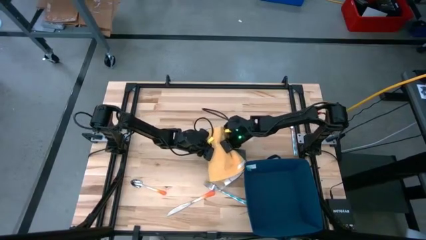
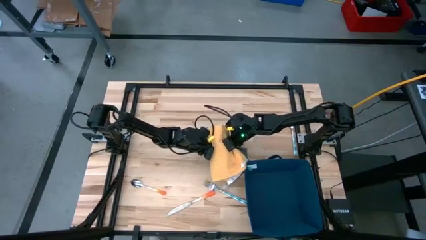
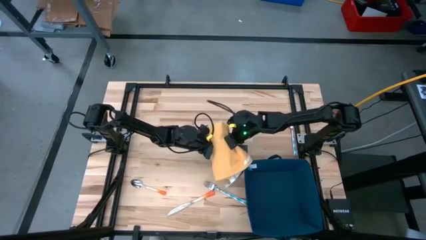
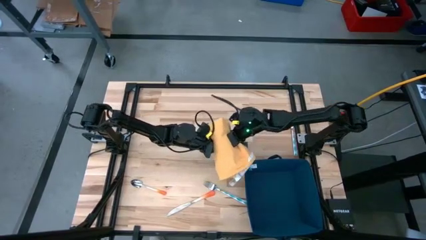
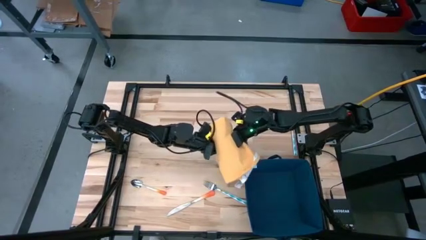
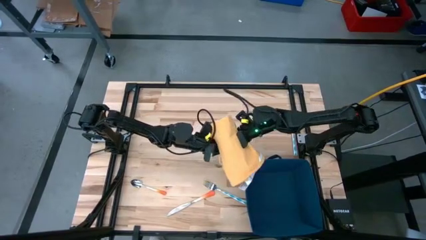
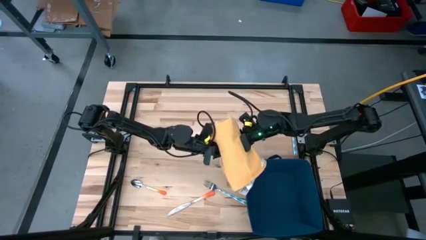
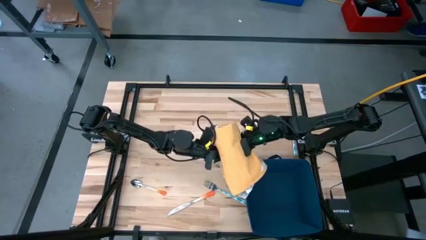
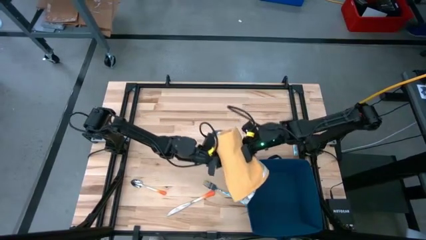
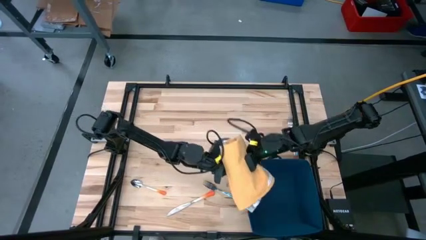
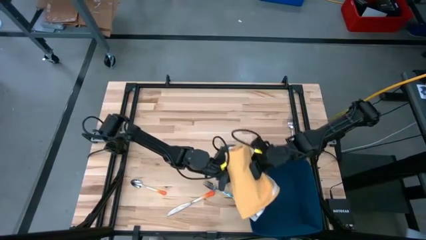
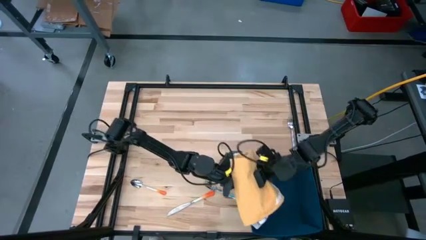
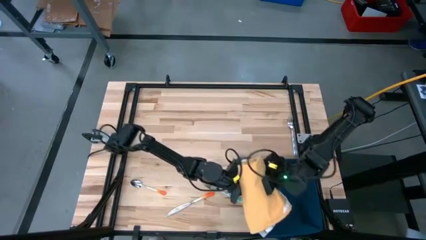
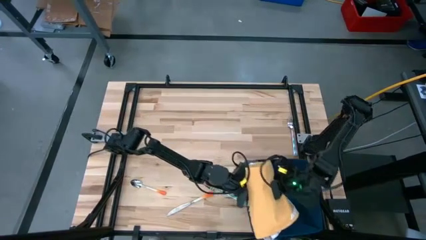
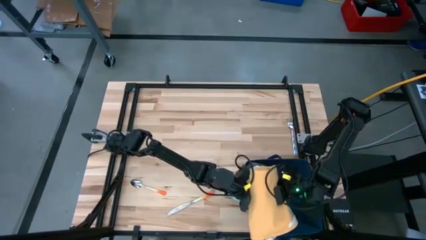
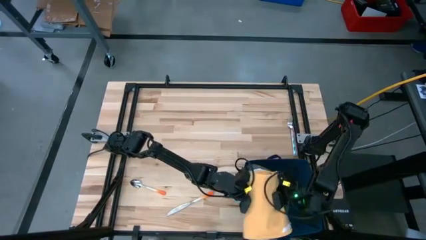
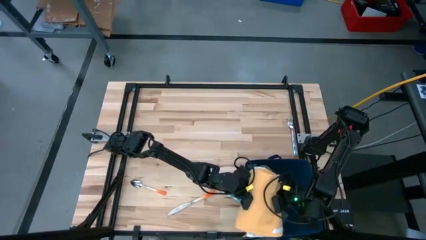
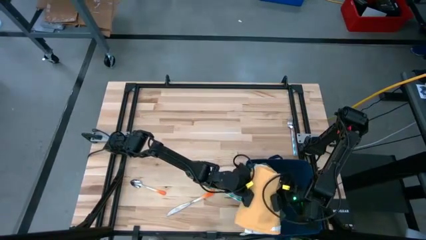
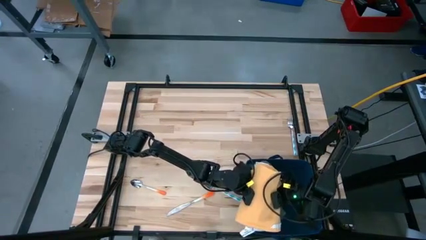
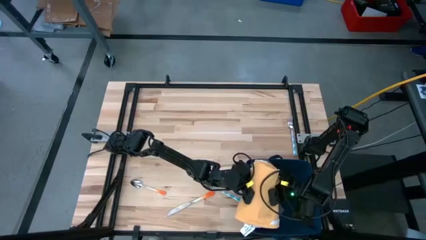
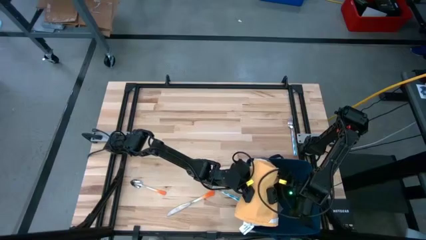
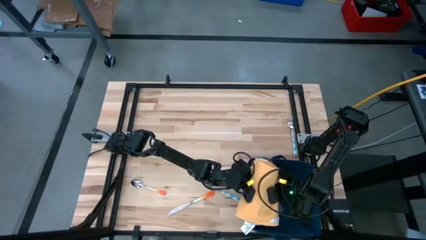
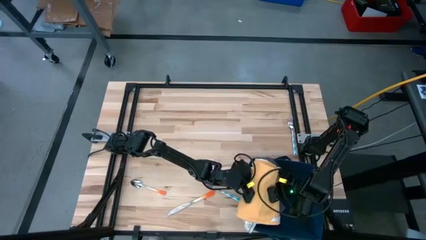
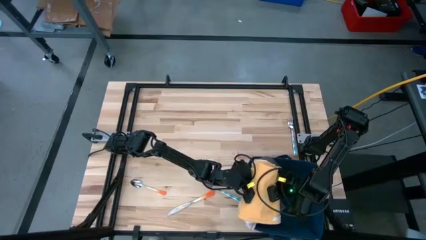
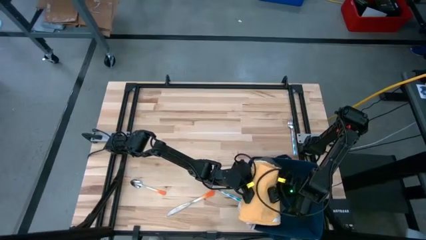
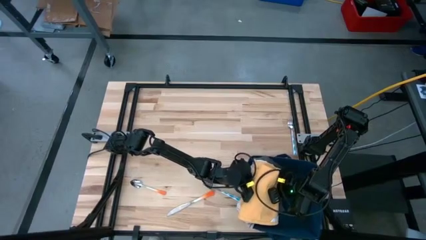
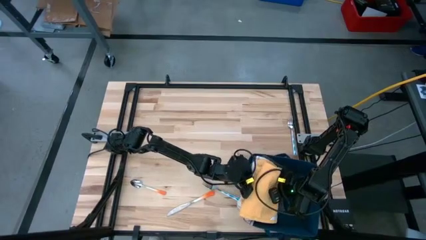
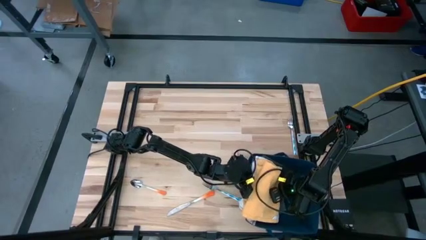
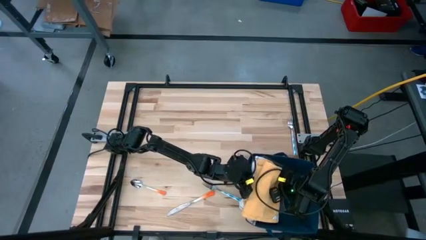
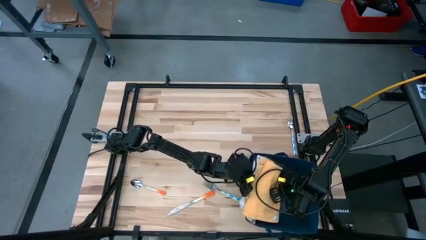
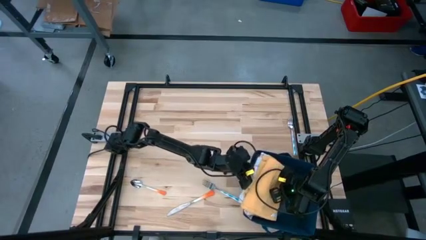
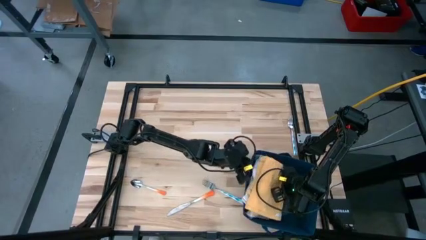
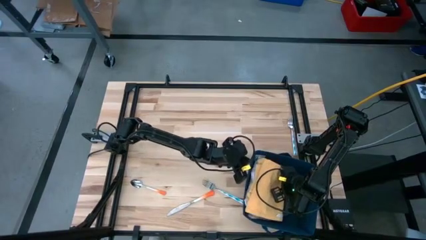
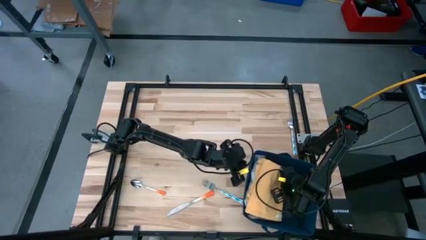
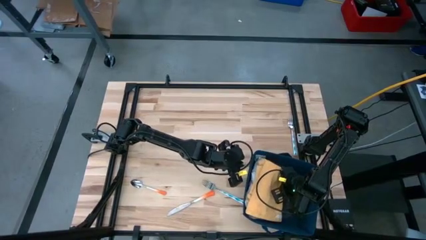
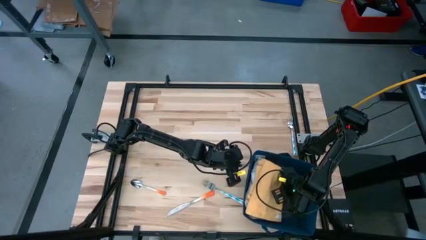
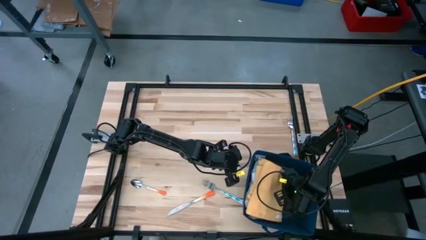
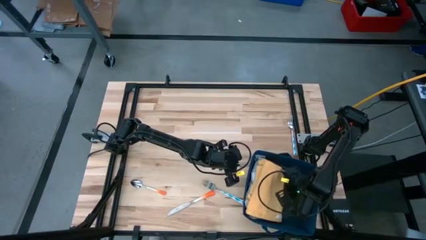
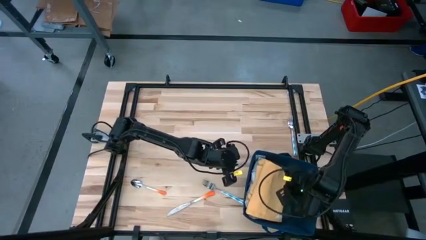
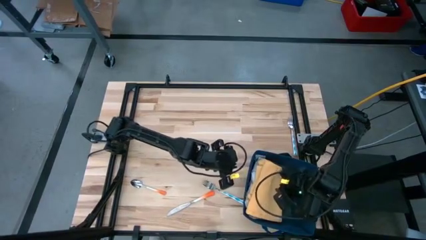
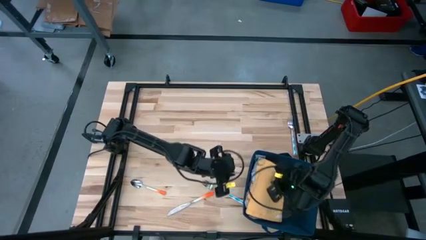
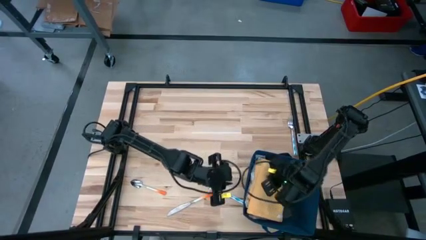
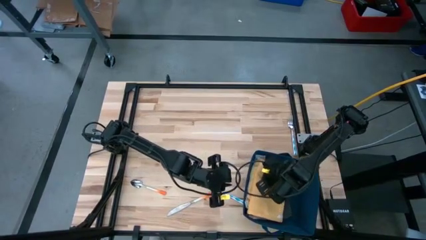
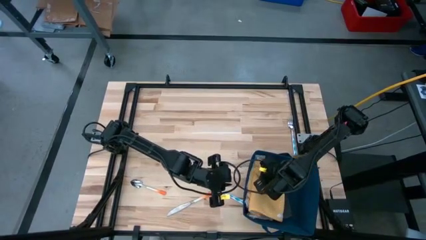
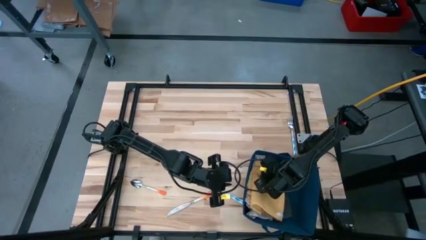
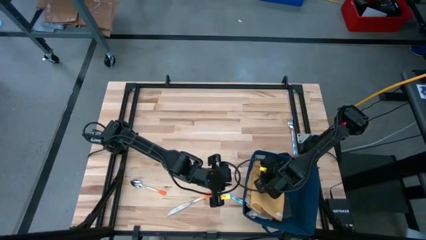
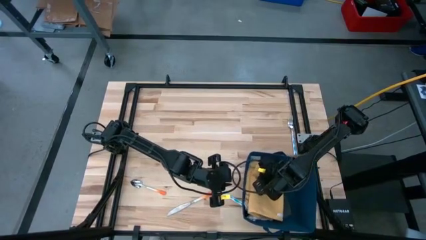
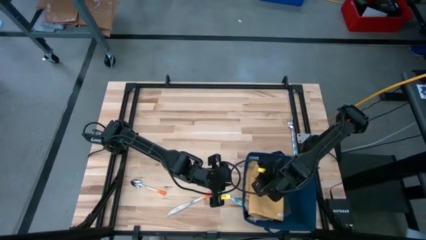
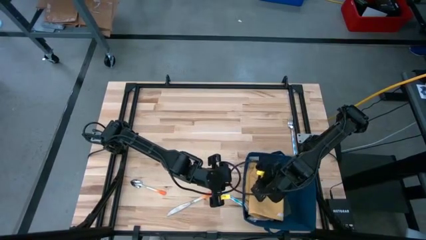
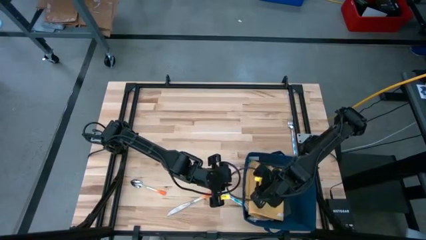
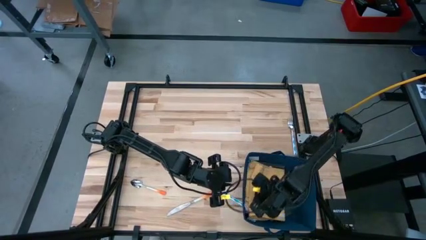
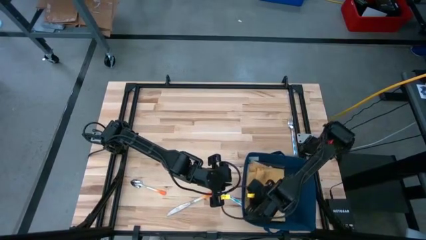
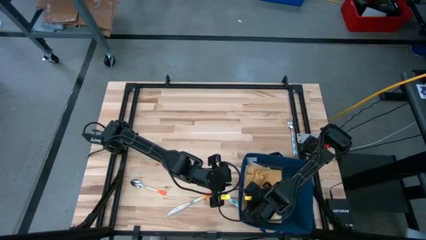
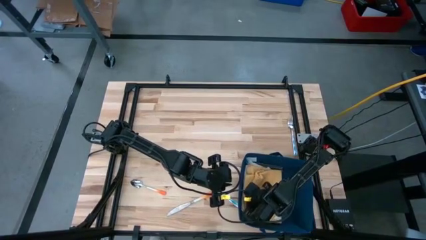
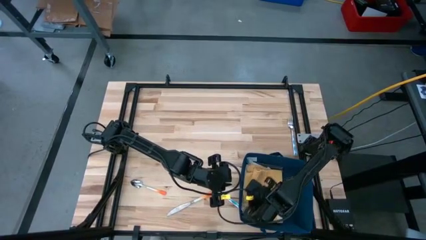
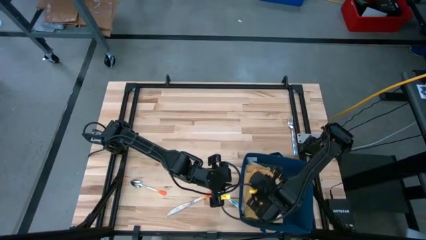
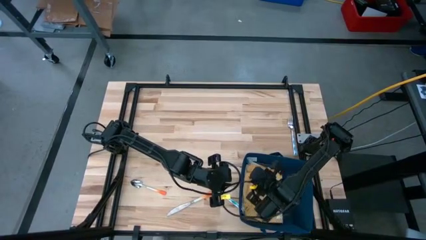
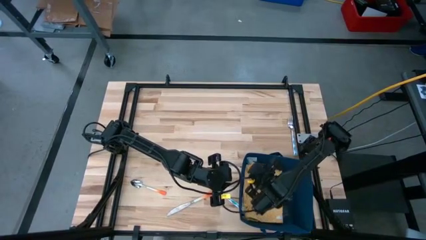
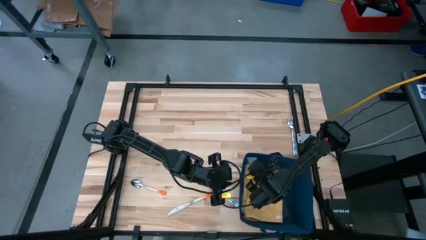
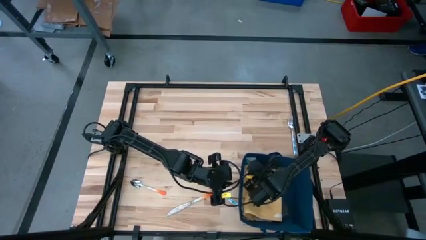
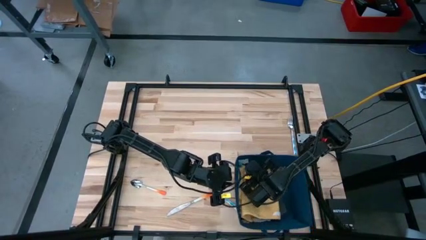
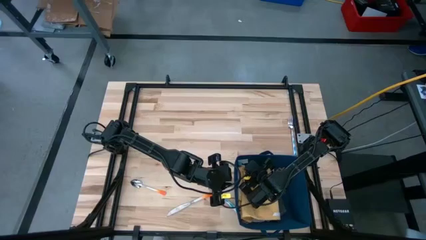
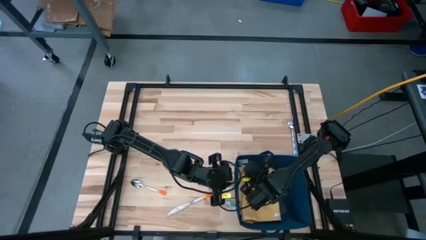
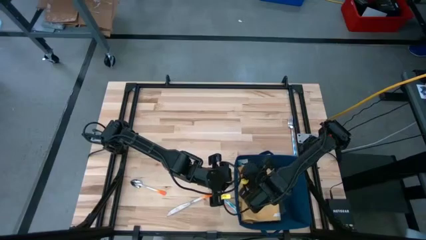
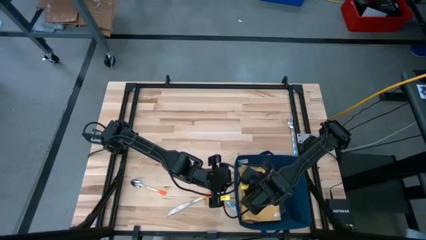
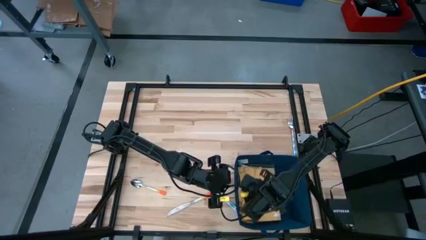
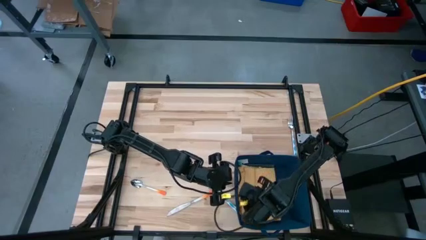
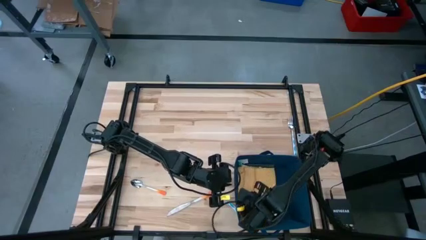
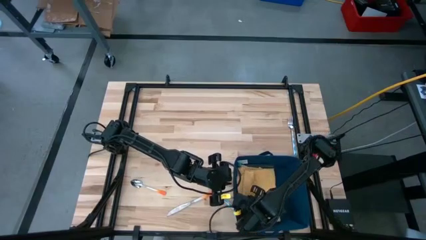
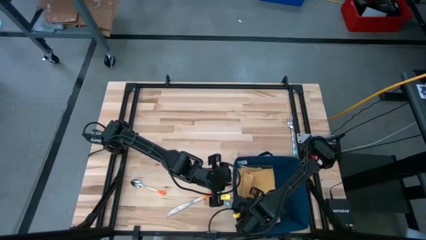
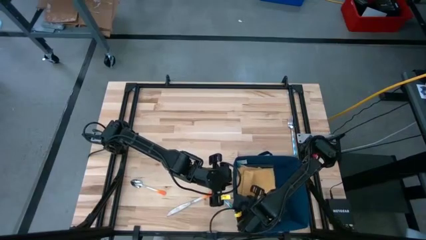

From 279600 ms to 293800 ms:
Task: Fold towel
Put the stacked towels into the laundry bin
